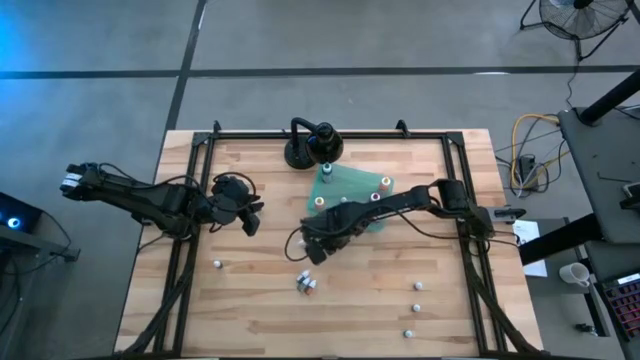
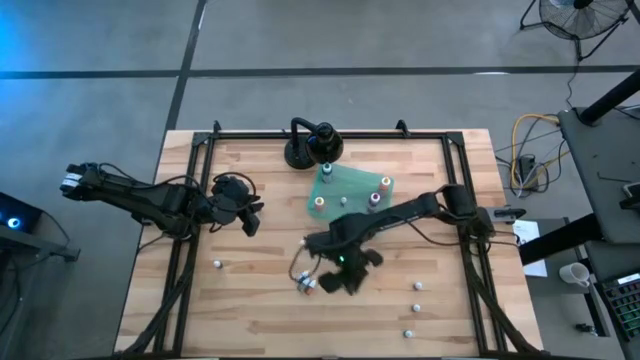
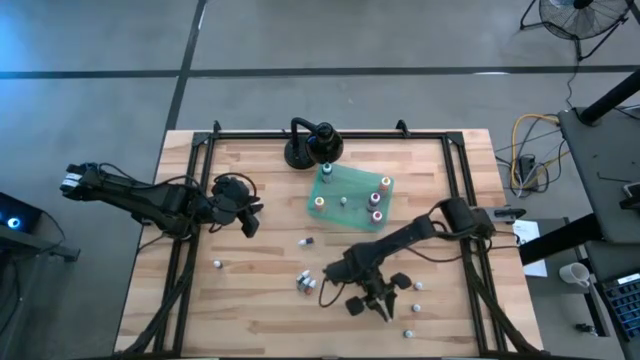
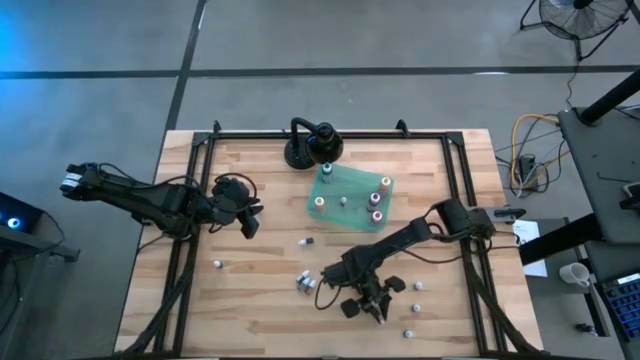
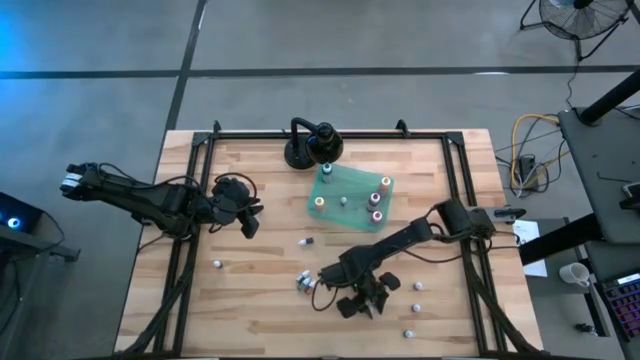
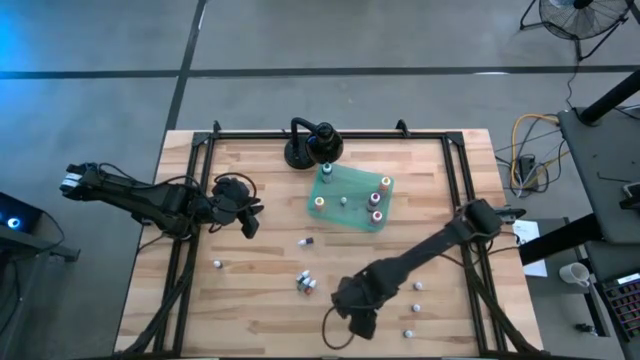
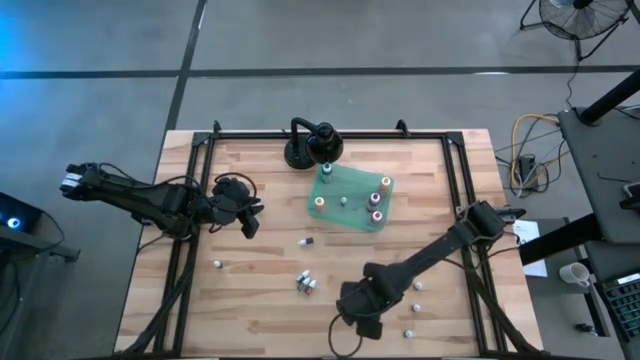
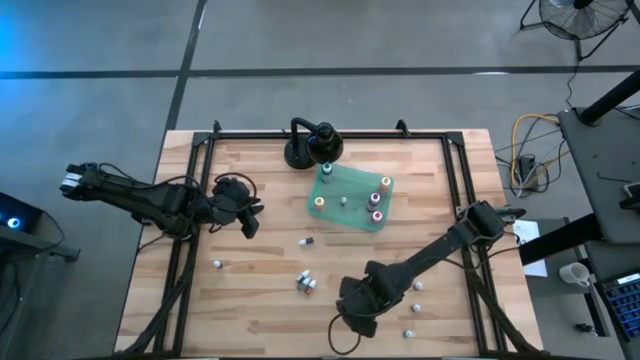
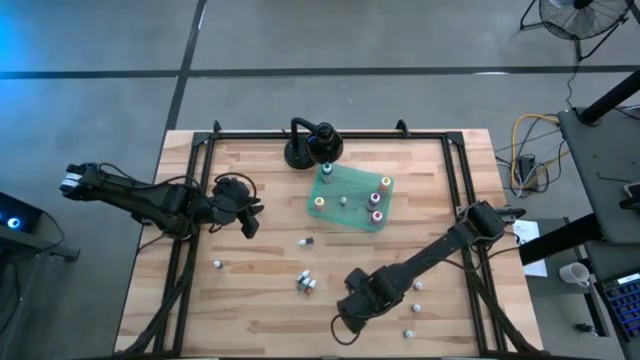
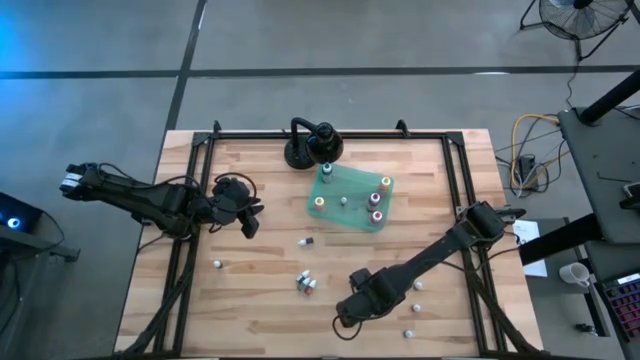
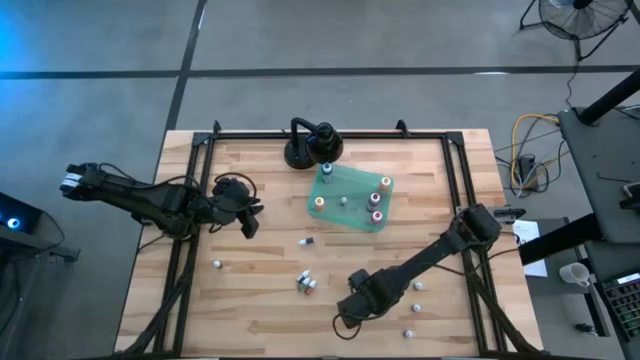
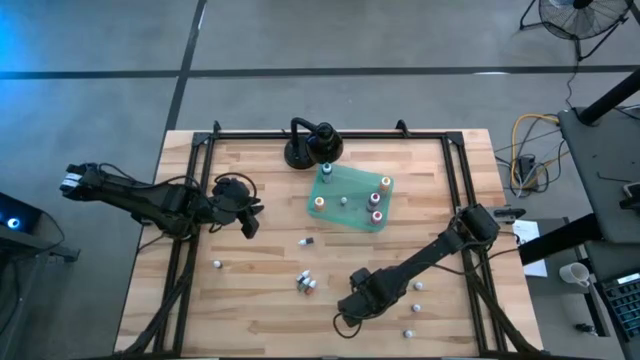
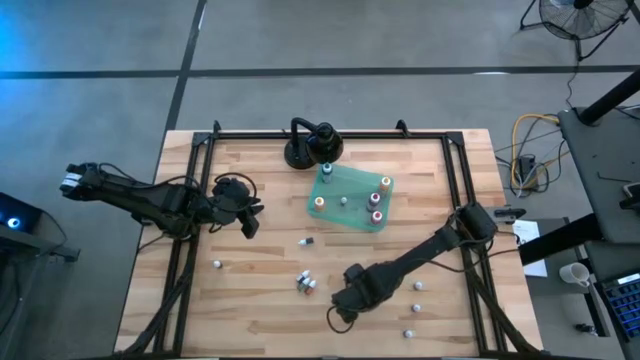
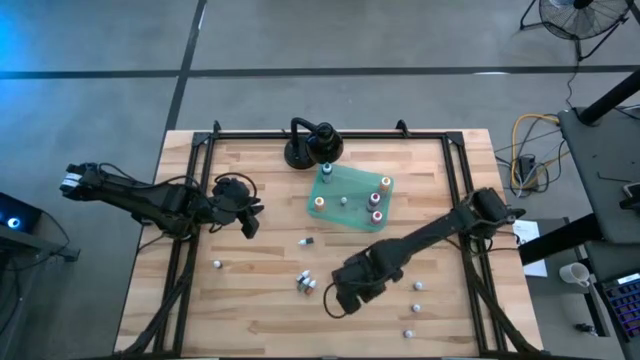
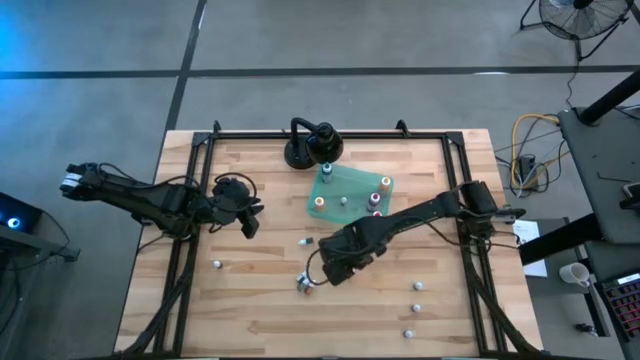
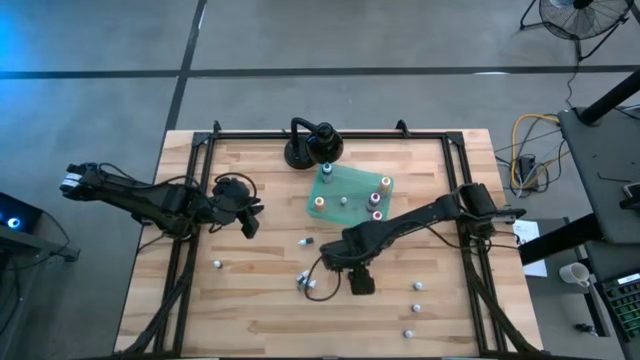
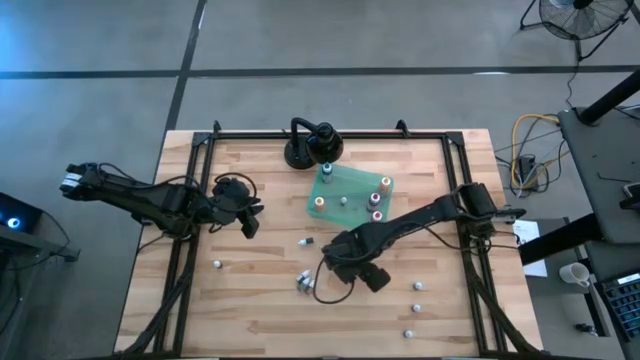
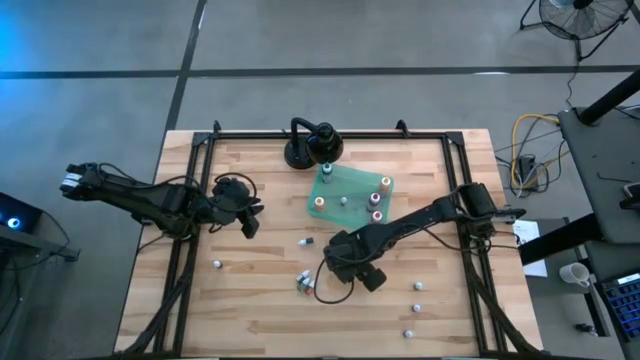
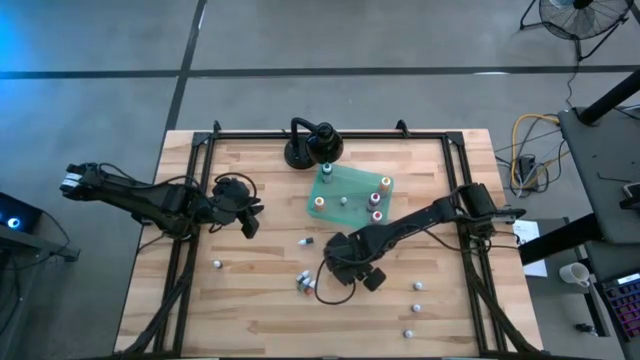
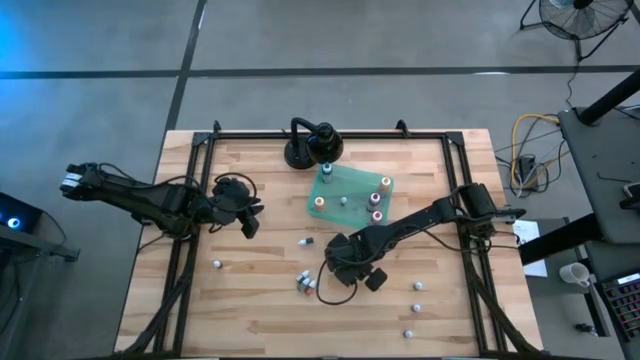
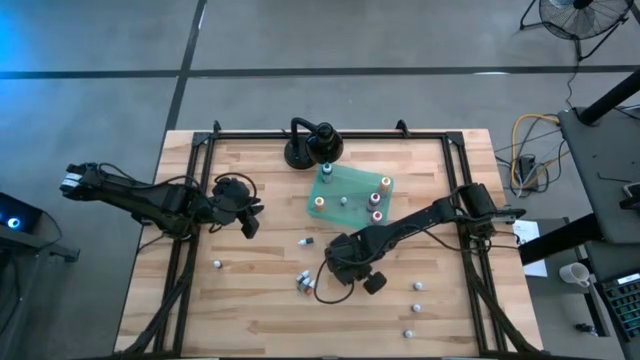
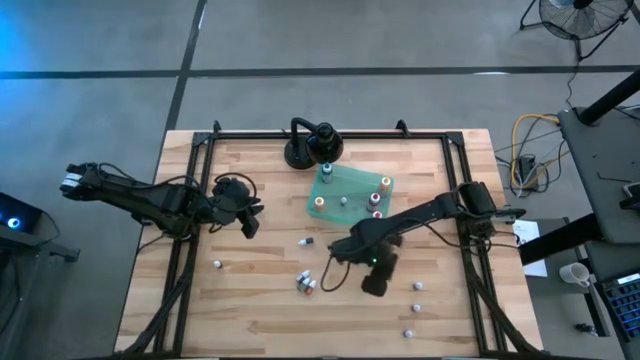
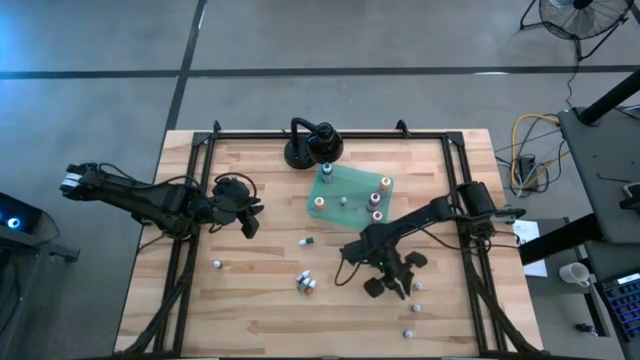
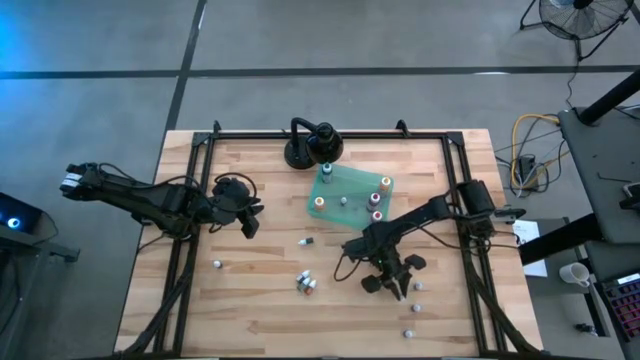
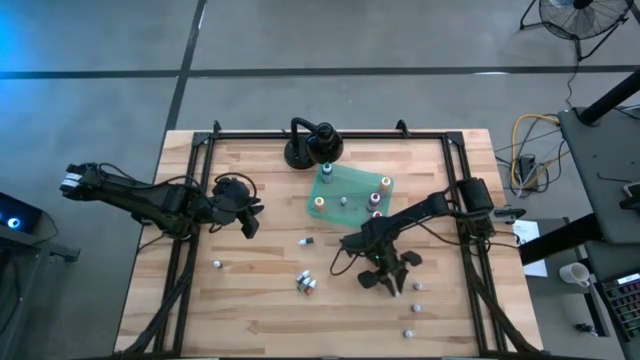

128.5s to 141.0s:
Task: Pick & Place food coloring
Move the blue food coloring bottle to the bottom right of the table

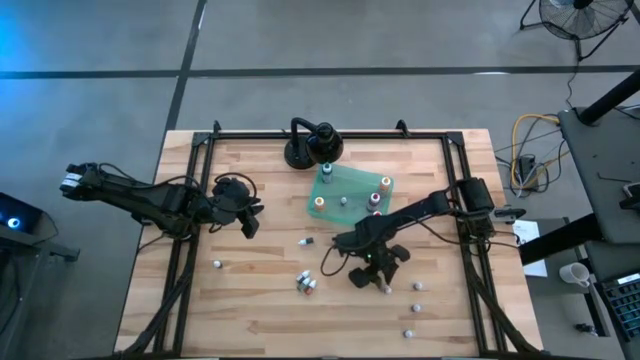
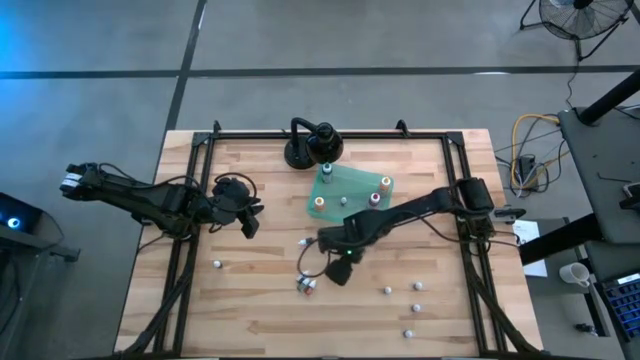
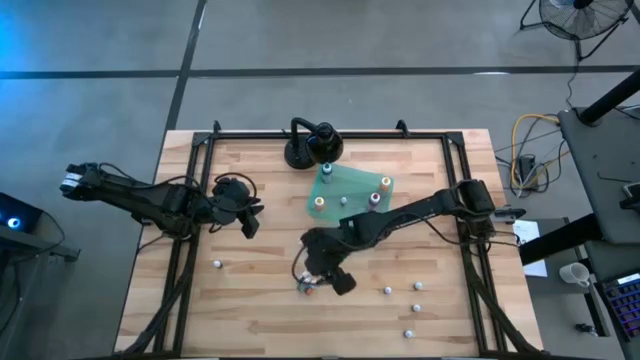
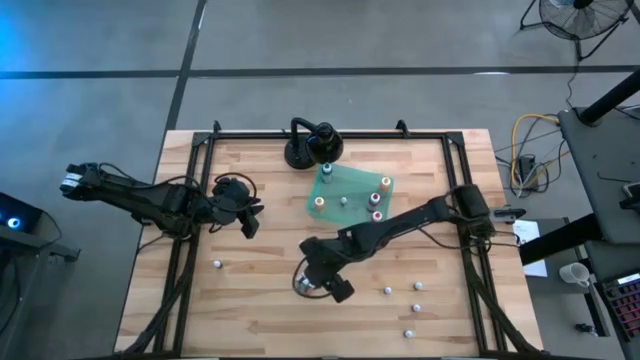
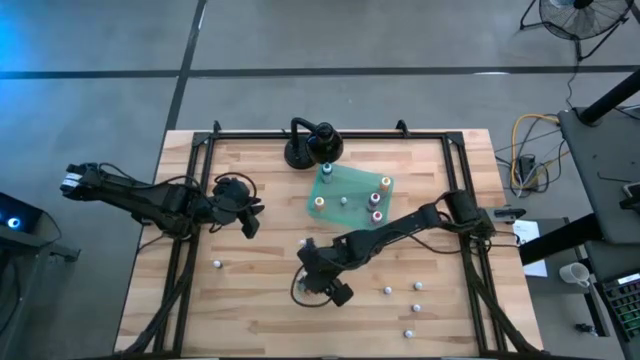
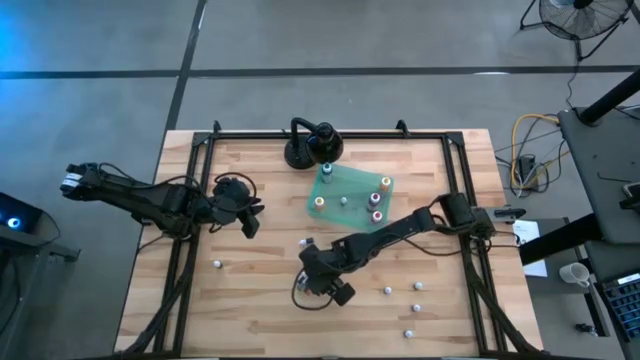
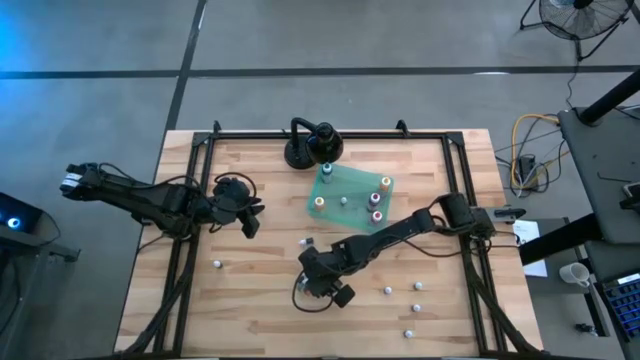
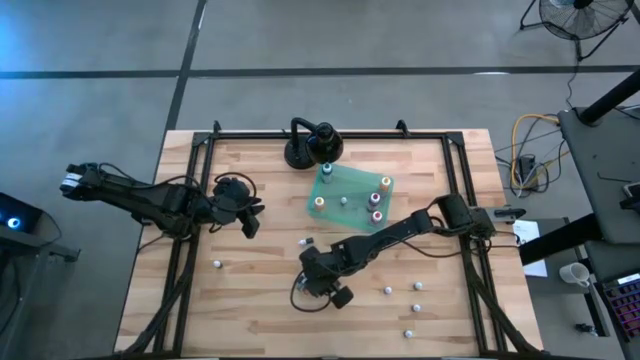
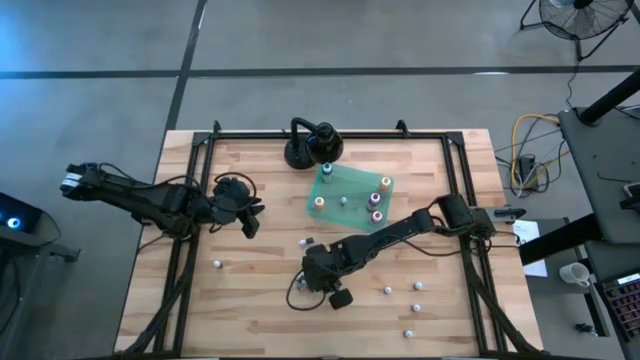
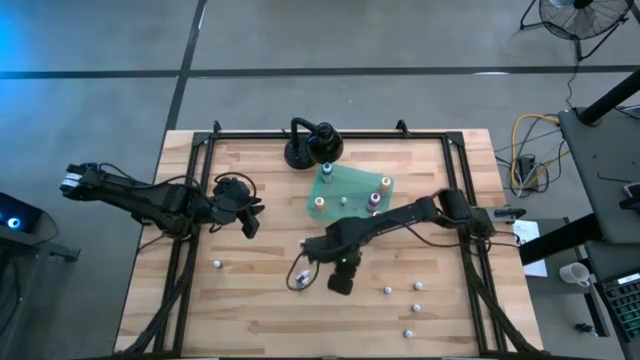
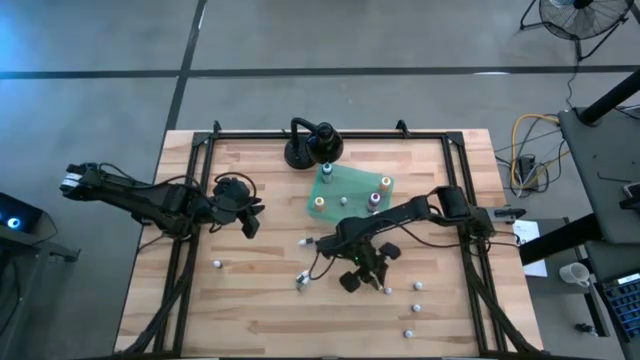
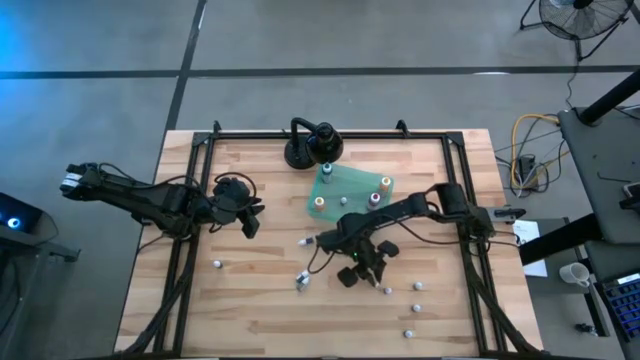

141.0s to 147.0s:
Move the orange food coloring bottle to the bottom right of the table

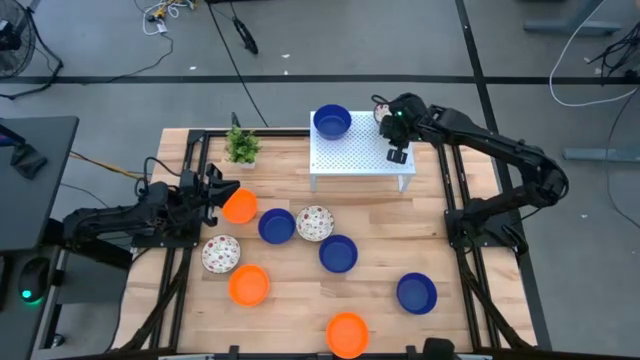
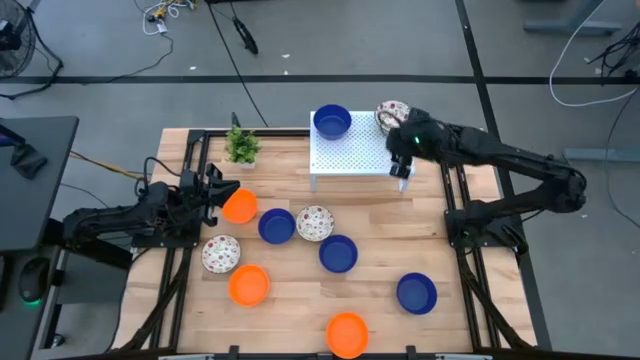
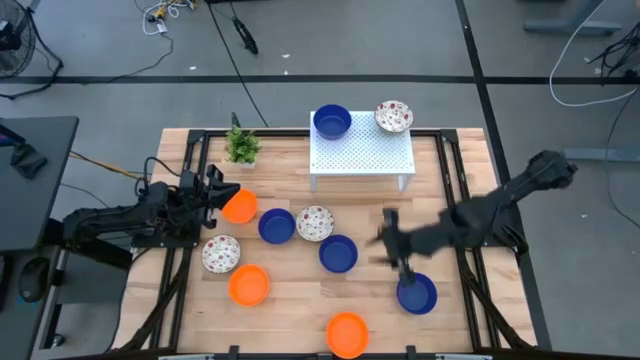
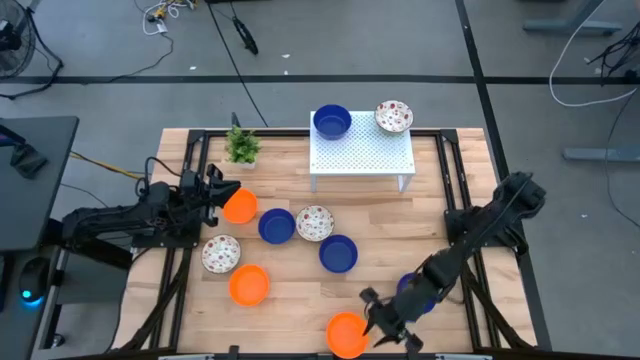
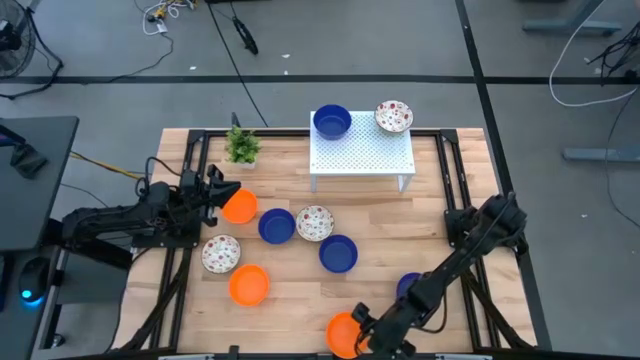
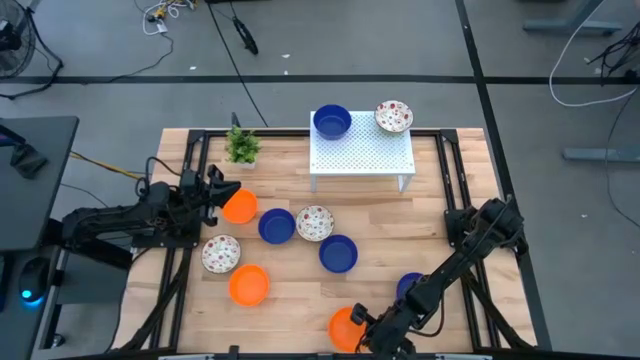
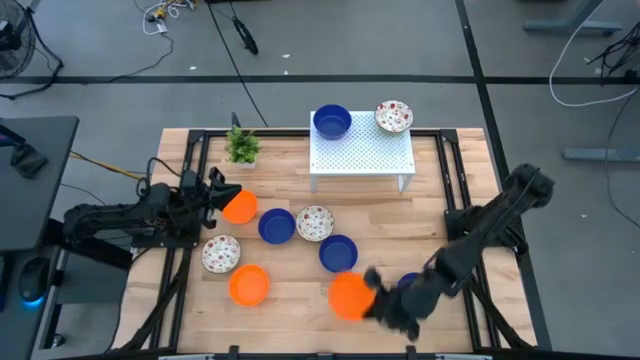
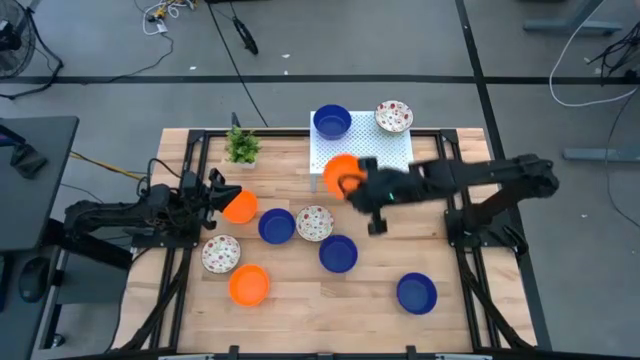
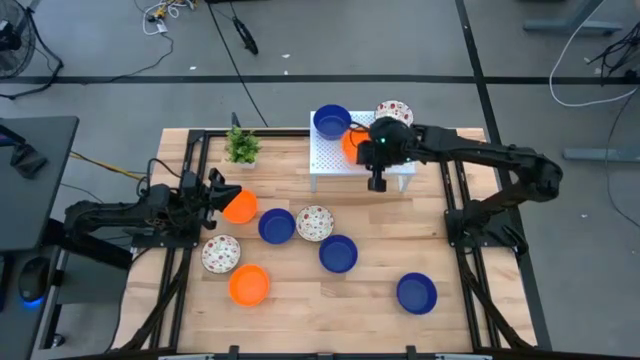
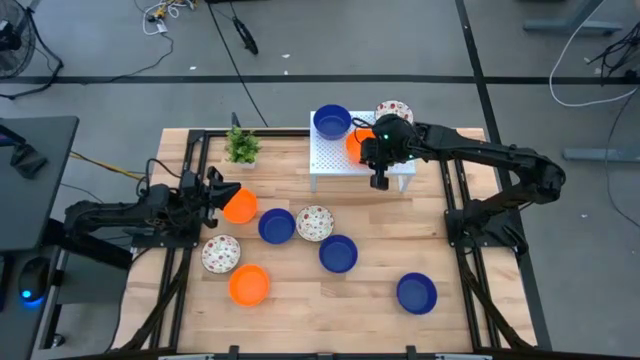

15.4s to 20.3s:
Task: Pick & Place Mini bowls
Put the orange bowl on the shelf
